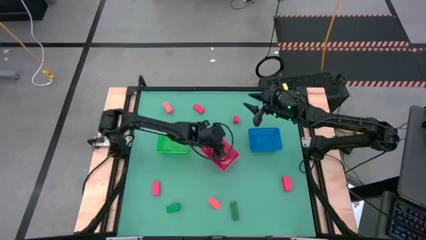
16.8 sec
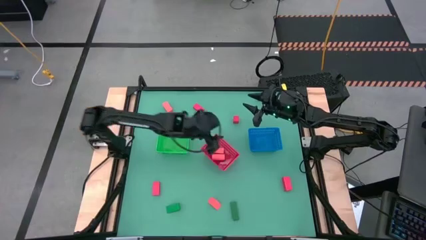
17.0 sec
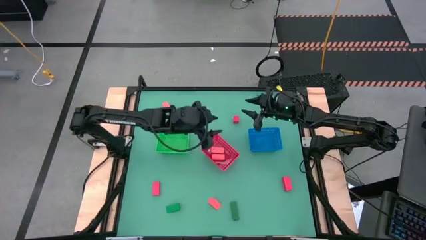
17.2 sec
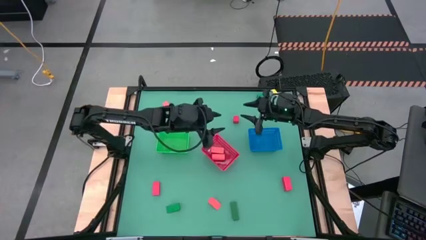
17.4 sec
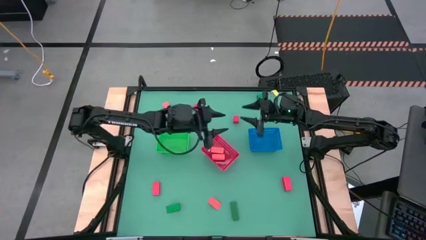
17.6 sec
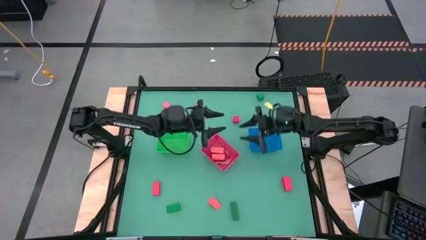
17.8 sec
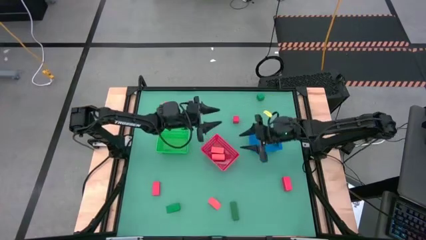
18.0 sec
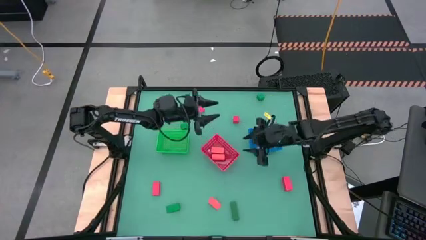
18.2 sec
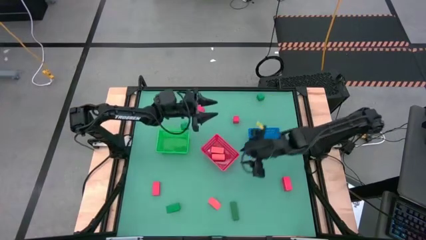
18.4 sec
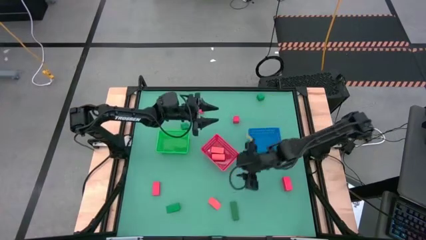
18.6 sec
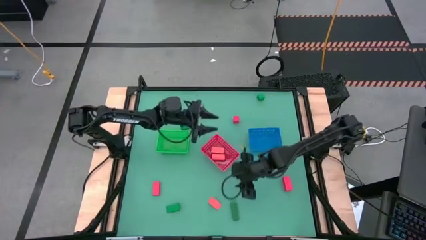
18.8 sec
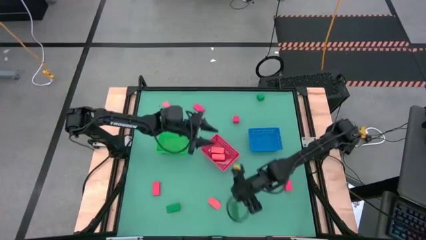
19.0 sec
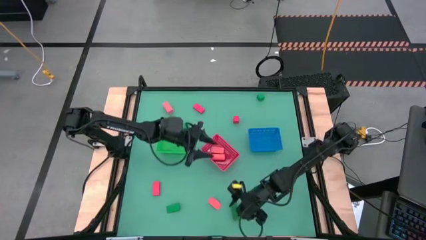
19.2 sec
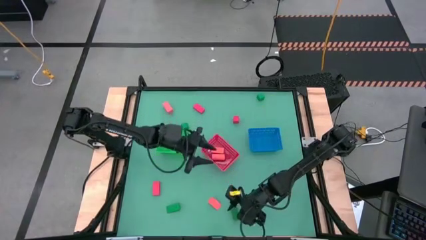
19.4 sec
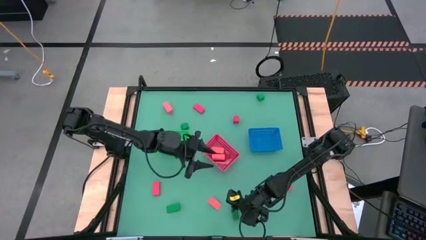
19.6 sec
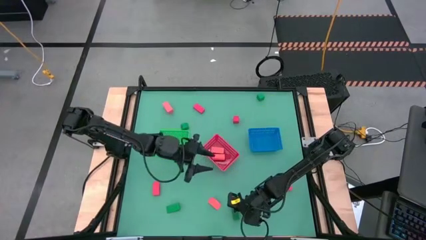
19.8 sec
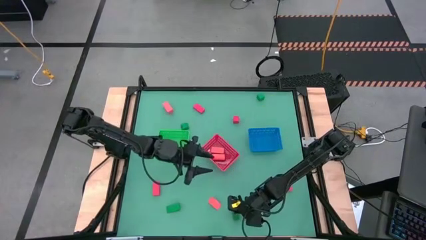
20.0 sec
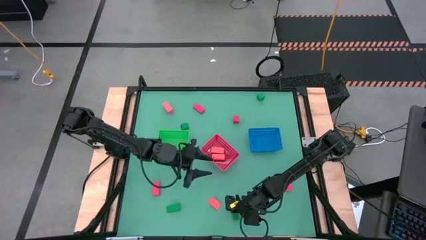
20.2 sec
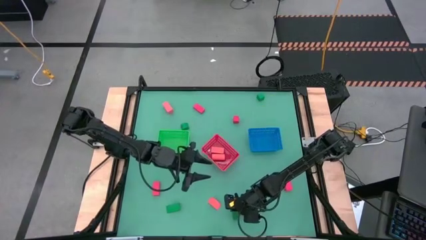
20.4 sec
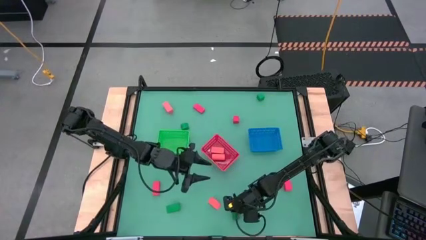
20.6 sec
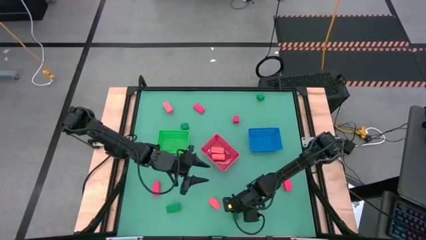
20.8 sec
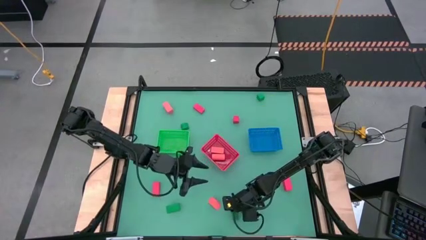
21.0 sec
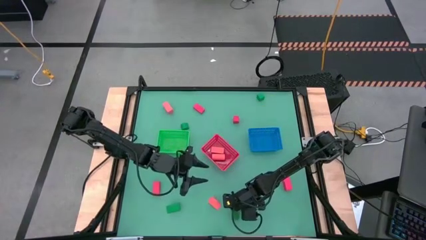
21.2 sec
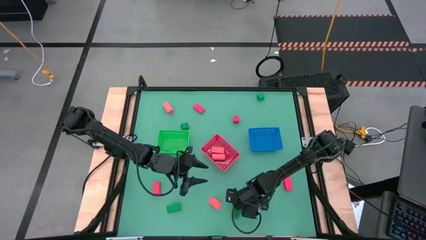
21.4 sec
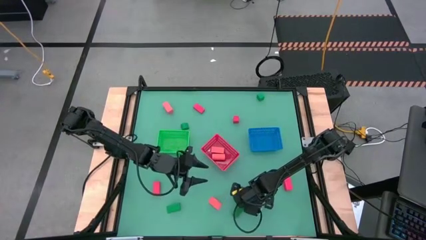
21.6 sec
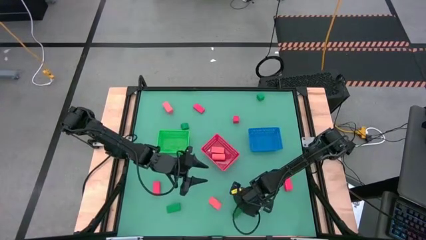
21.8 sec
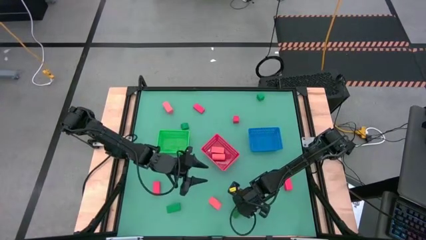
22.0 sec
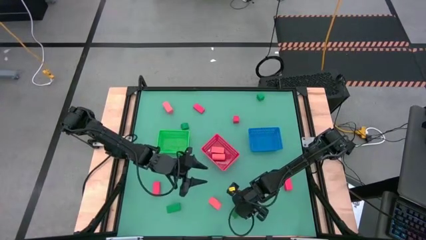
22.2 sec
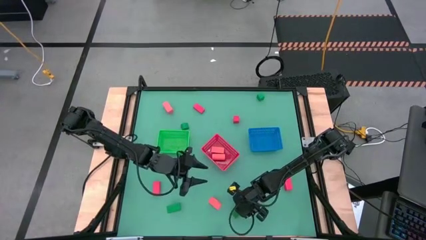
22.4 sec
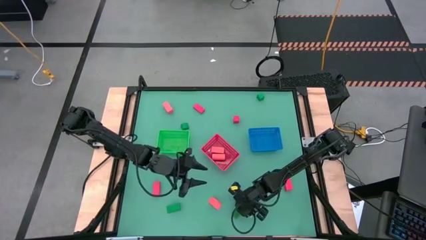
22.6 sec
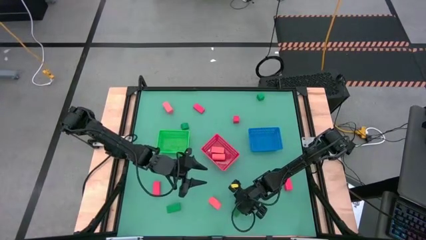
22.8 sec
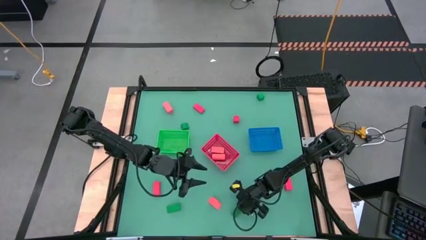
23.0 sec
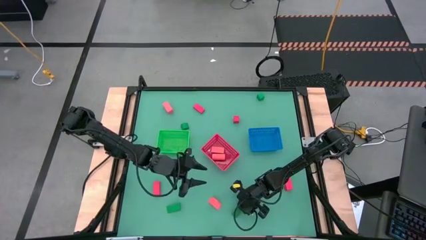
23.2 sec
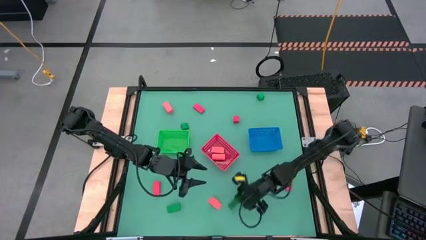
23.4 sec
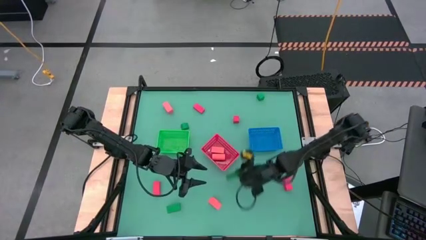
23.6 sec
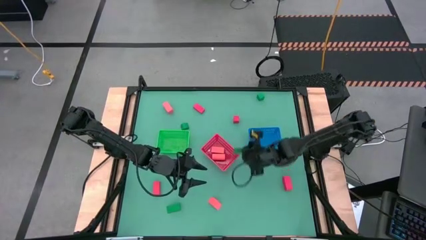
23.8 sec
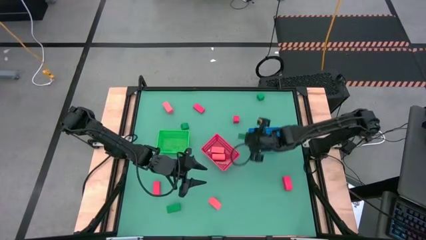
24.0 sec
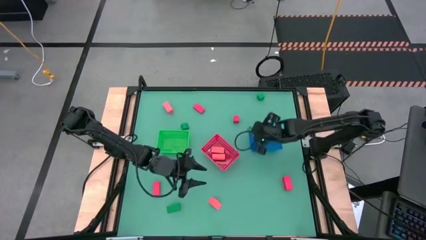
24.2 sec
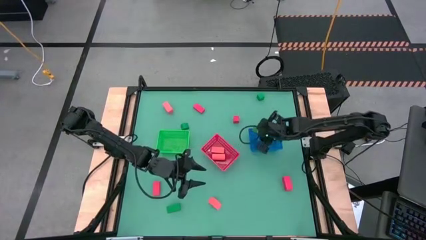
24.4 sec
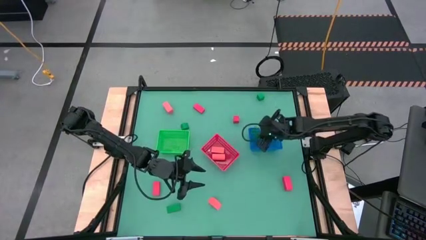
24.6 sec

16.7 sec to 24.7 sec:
Task: Sort & place blocks by color
Put the green block into the blue bin

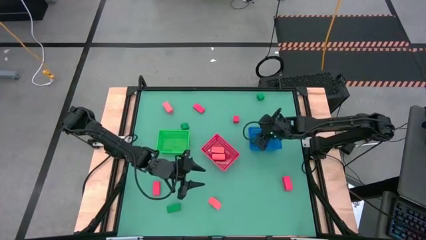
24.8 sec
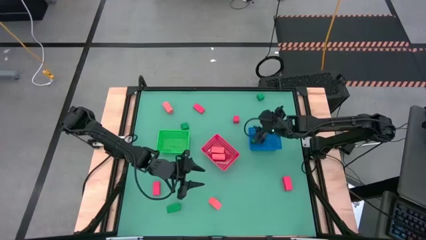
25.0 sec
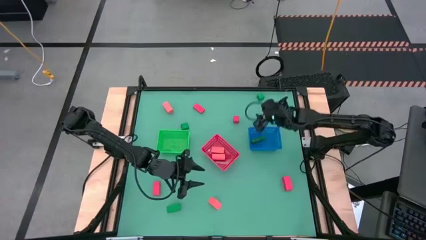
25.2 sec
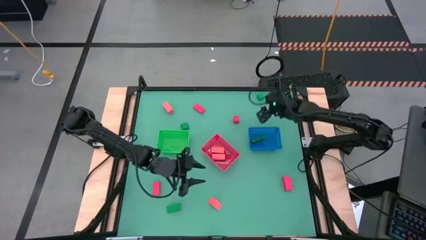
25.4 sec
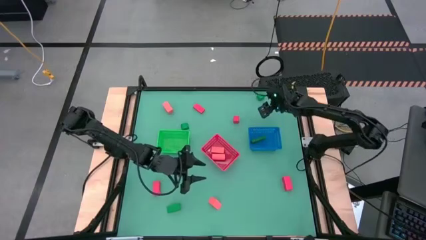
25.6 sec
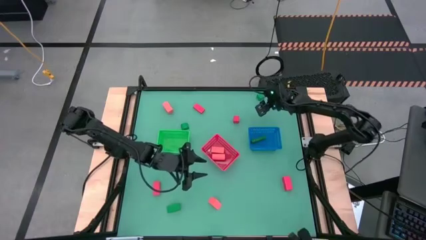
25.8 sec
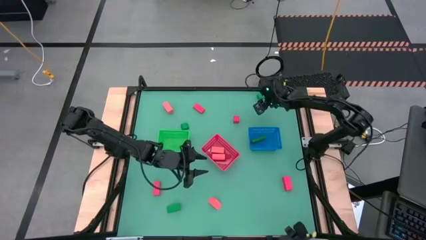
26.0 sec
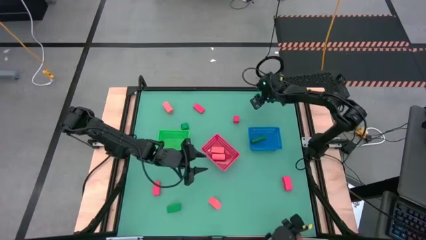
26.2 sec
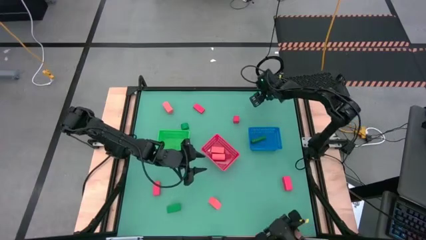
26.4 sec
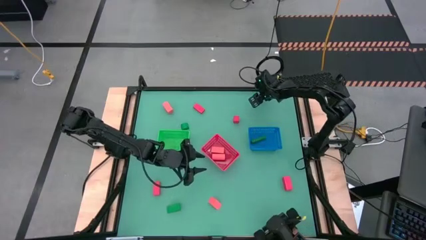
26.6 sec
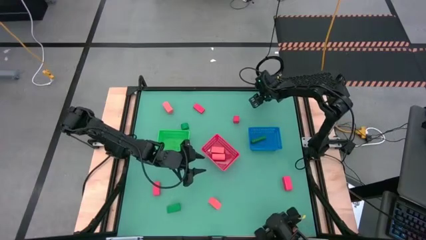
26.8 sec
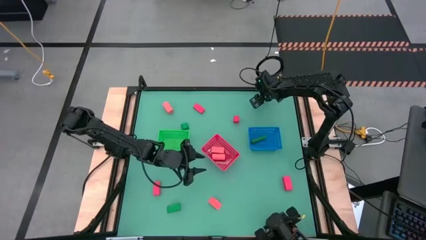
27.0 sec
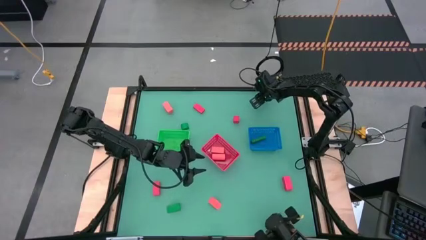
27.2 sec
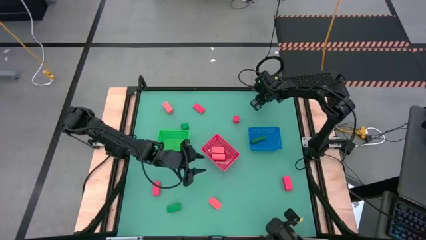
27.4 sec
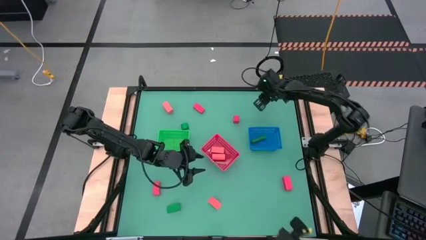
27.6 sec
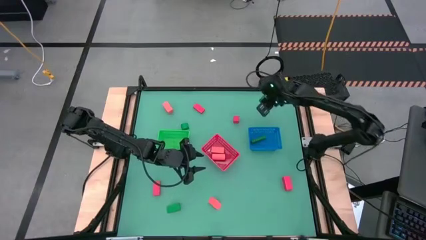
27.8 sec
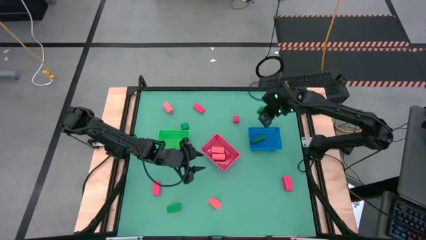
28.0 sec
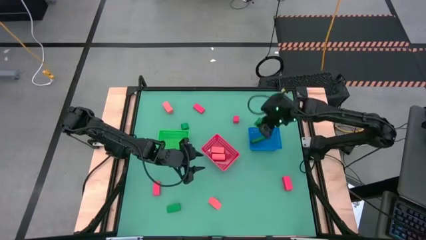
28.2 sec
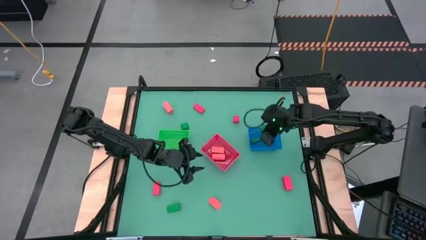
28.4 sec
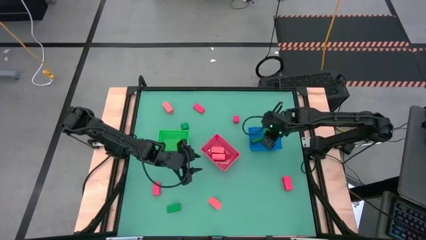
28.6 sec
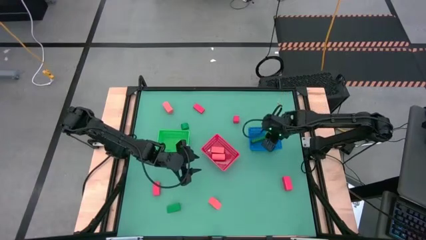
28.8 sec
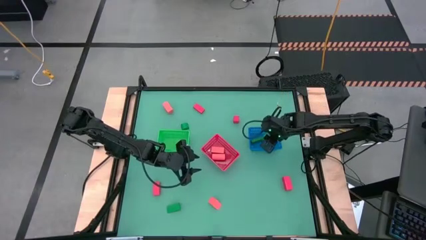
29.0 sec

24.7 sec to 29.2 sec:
Put the green block into the blue bin

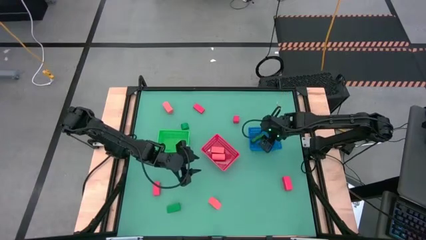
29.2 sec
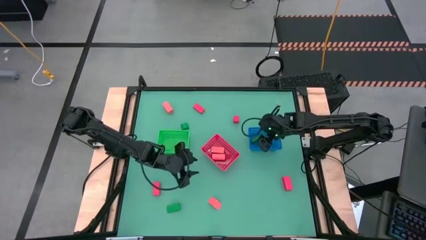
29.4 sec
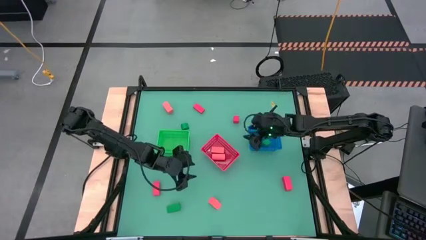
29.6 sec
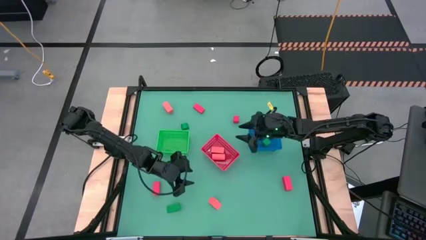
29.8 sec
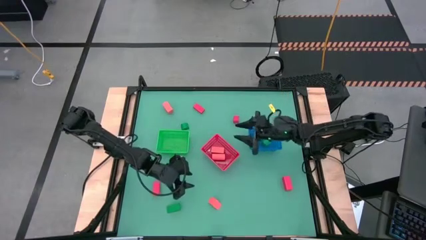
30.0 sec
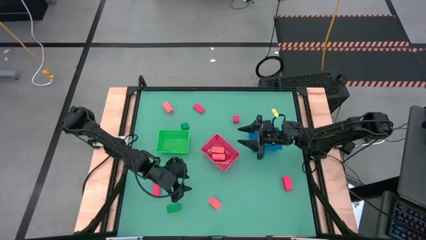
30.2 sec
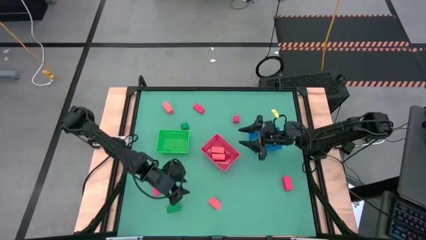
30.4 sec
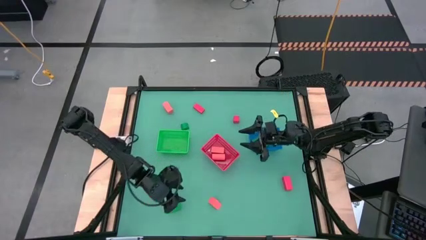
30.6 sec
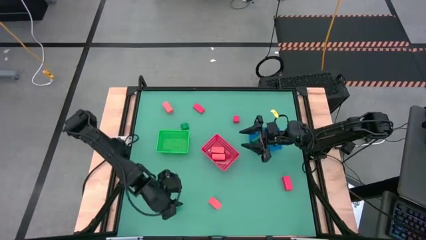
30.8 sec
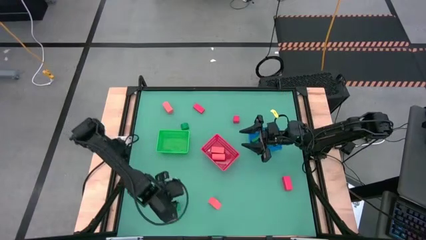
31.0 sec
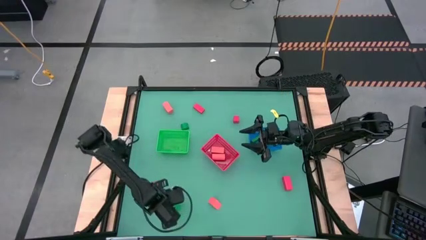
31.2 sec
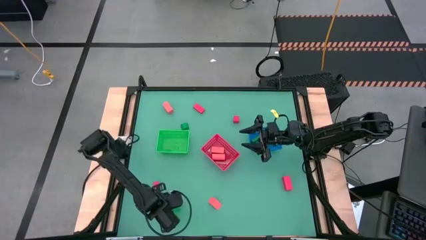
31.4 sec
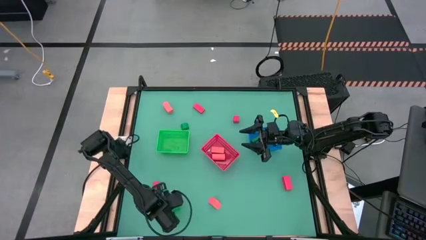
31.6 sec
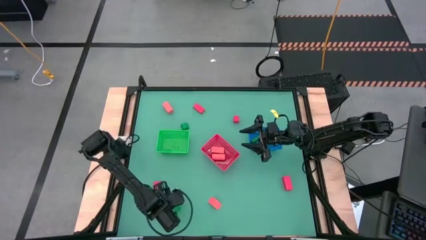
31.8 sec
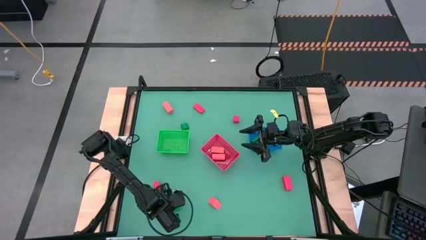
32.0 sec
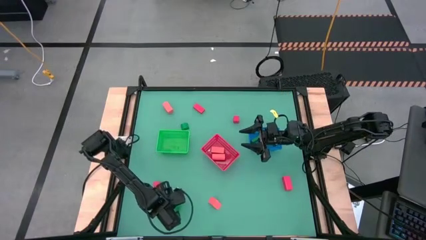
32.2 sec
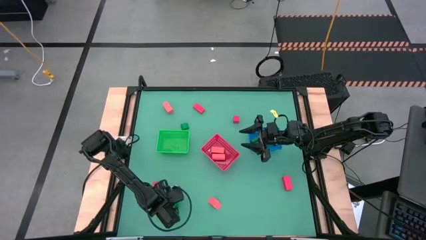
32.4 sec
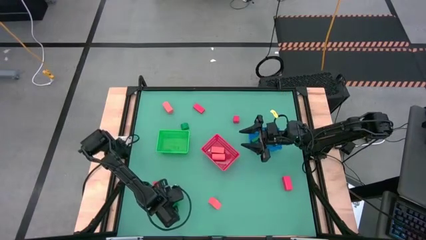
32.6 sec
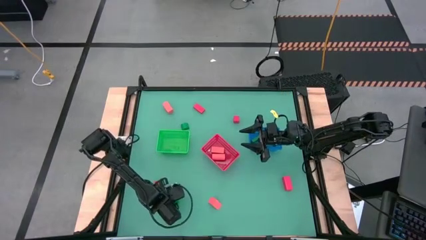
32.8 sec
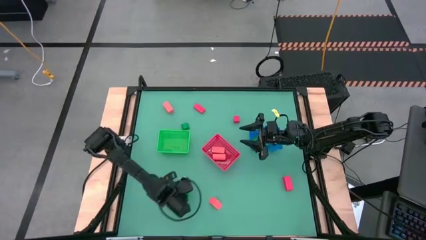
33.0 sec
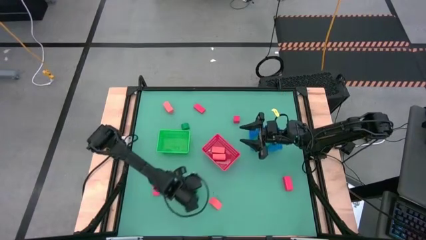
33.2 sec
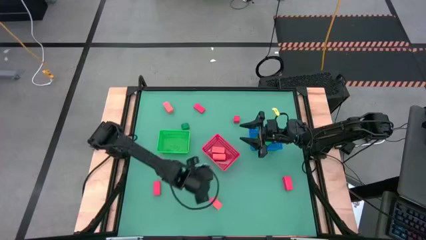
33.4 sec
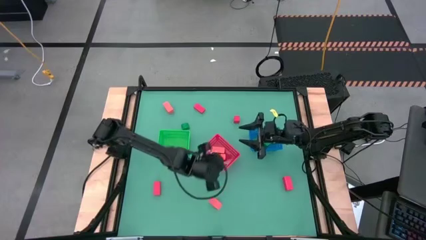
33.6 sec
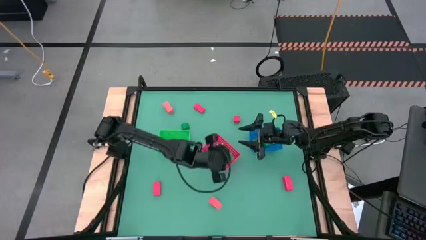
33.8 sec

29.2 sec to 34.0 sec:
Put the green block into the blue bin
